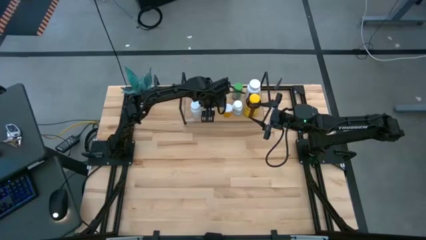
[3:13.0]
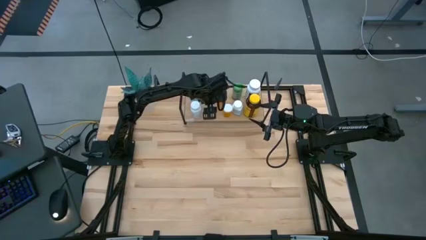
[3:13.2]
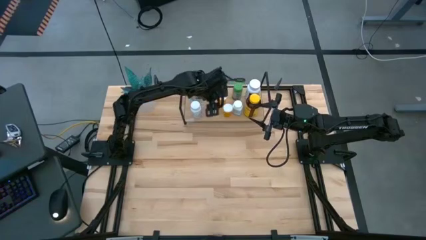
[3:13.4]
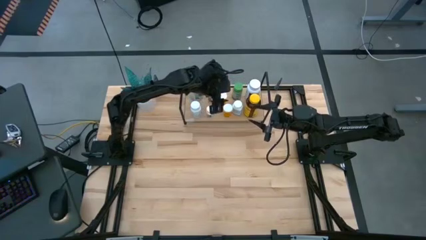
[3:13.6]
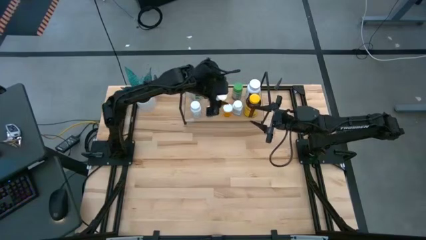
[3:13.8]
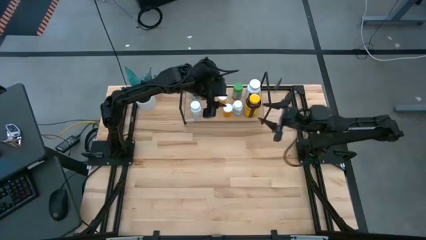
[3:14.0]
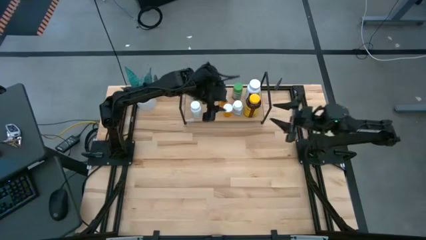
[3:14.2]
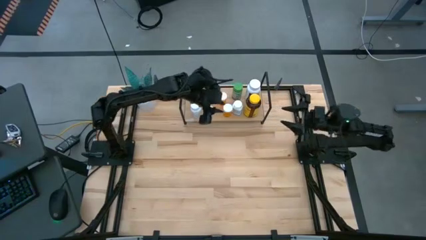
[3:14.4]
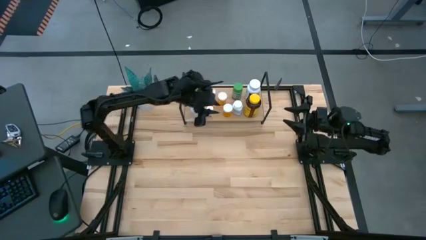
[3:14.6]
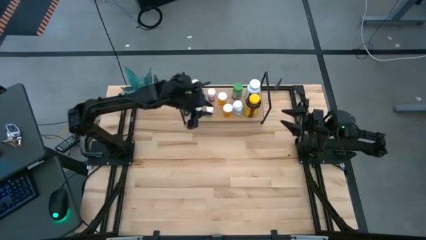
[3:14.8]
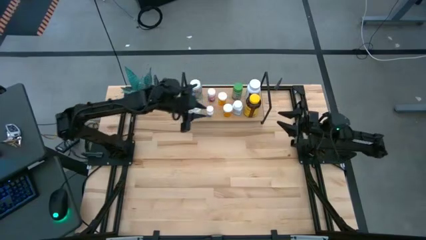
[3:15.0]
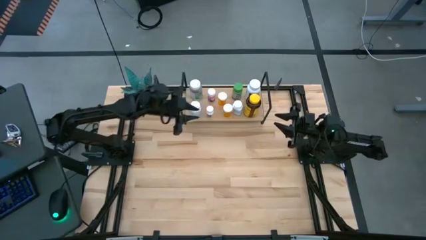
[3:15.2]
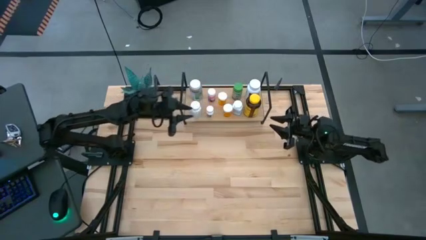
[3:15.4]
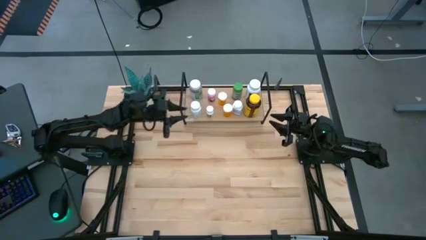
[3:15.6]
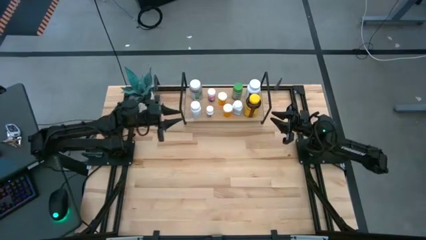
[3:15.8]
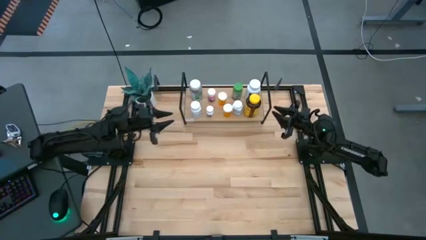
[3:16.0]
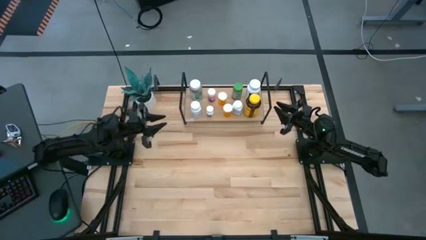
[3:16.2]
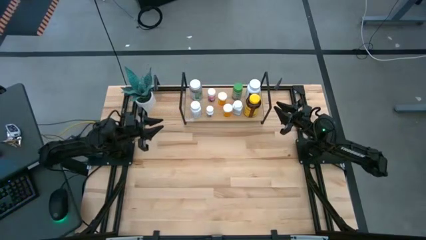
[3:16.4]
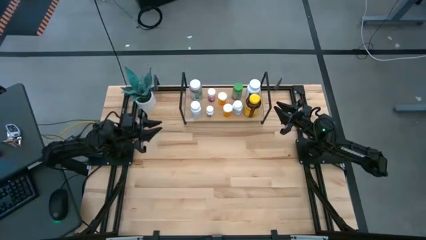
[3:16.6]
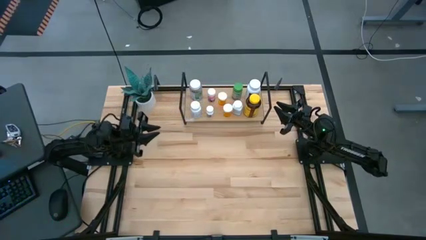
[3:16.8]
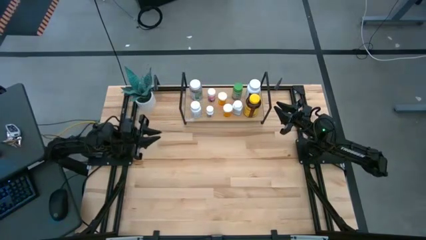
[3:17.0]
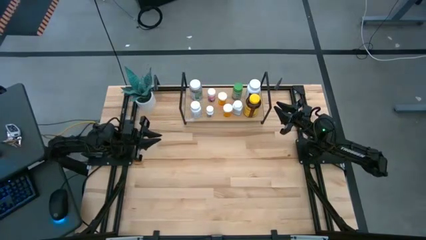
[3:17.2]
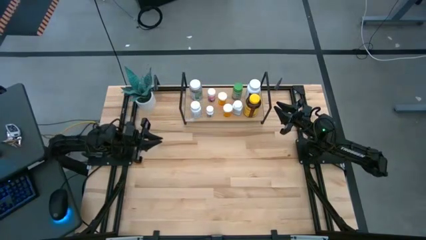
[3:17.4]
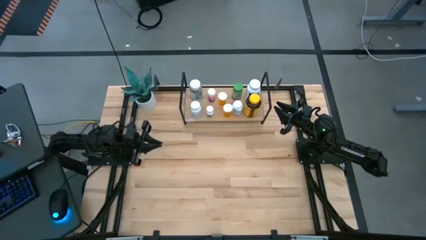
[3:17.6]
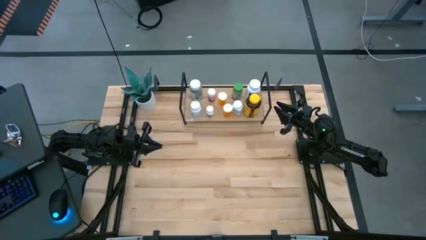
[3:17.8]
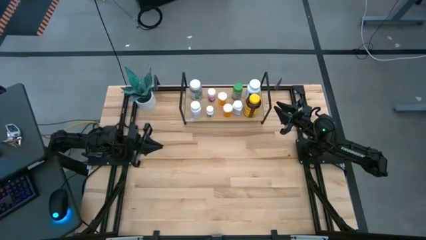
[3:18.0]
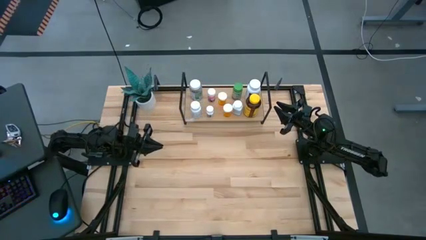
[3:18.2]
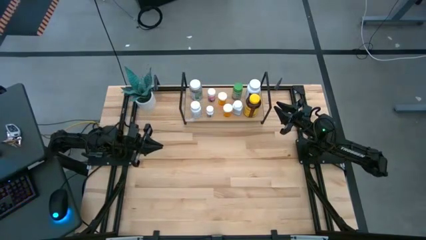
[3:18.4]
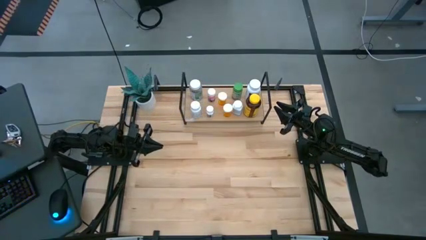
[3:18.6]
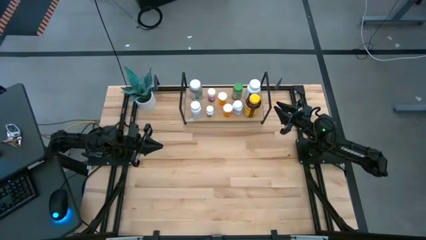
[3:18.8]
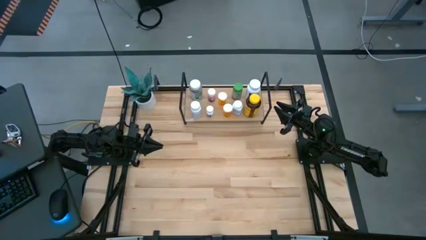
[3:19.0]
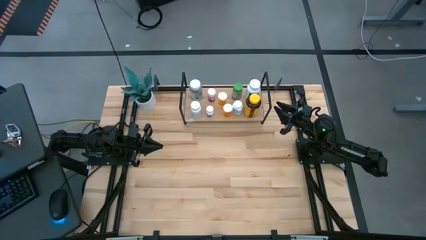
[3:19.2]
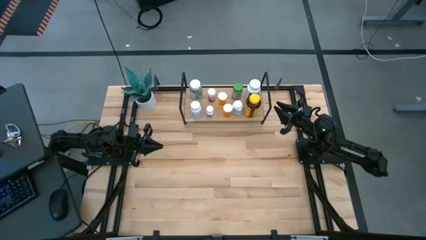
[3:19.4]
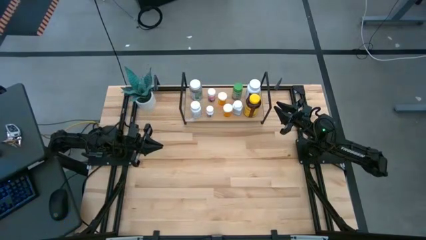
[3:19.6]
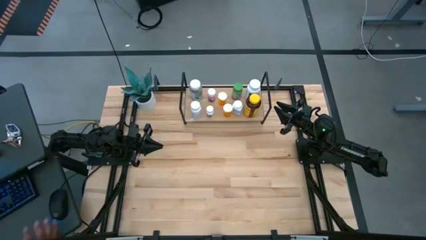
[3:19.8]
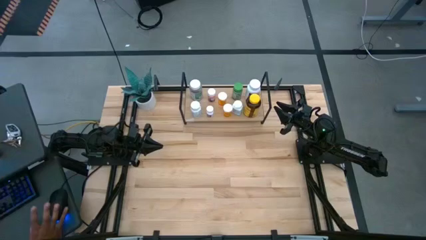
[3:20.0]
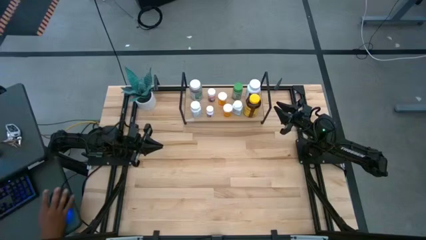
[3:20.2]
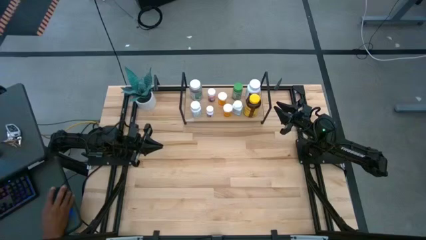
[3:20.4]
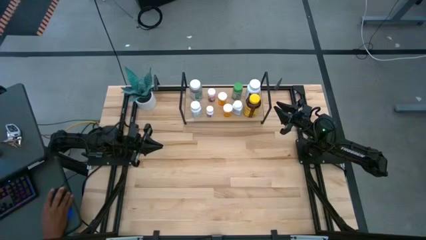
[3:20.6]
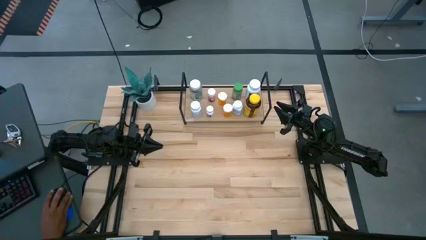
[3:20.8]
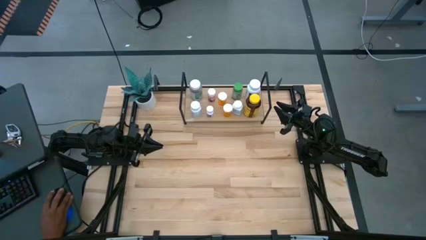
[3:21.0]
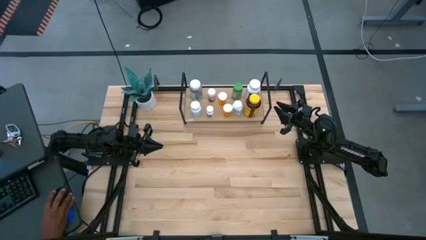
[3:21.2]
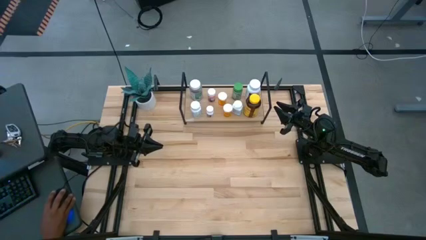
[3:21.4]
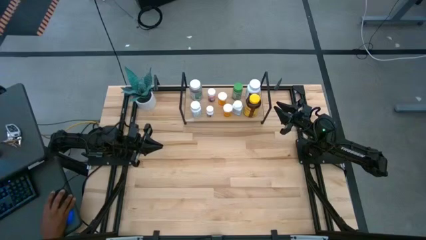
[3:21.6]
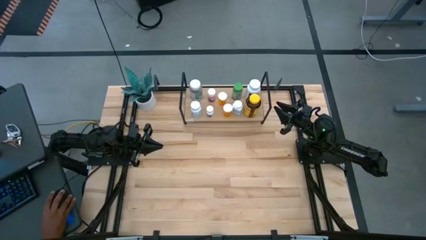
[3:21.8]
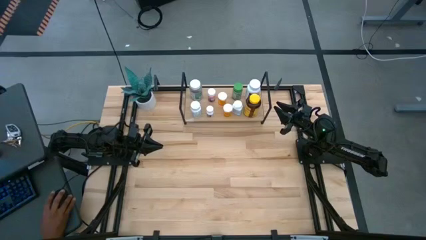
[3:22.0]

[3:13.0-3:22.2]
Task: Pick and place medicine bottles onto shelf by color
Return to Home Position

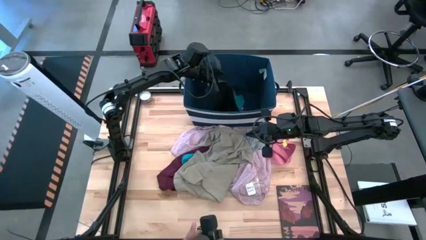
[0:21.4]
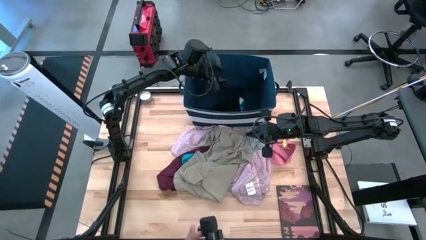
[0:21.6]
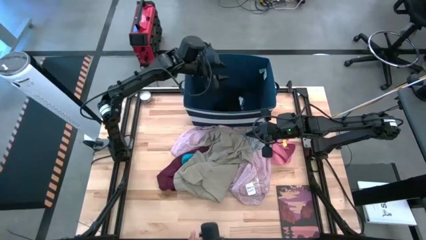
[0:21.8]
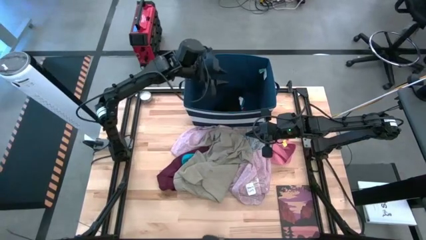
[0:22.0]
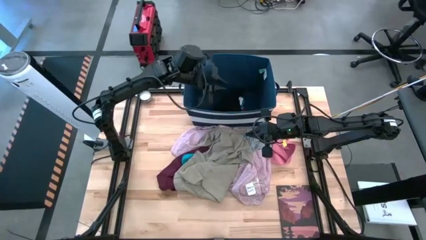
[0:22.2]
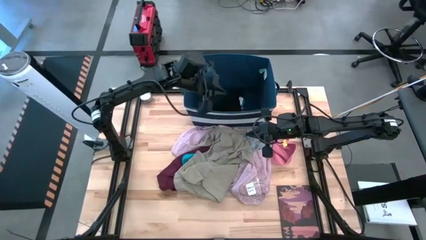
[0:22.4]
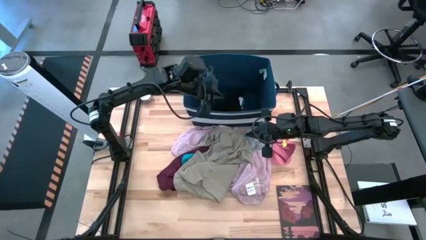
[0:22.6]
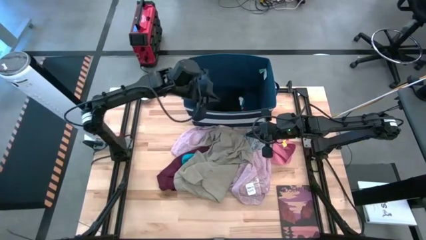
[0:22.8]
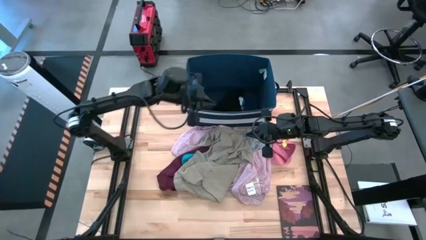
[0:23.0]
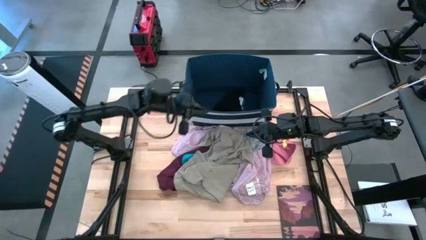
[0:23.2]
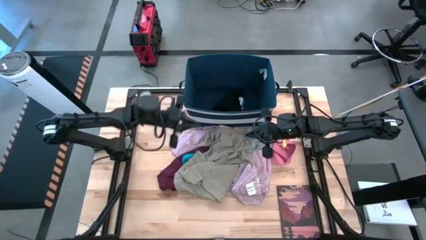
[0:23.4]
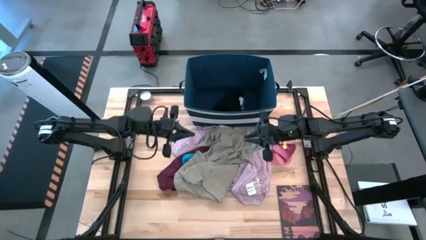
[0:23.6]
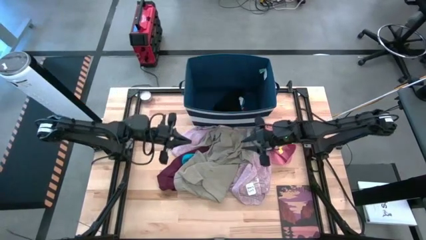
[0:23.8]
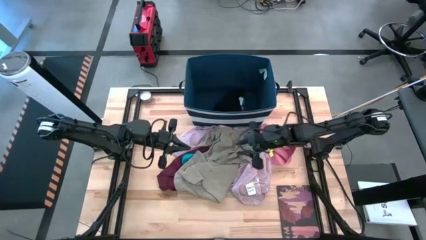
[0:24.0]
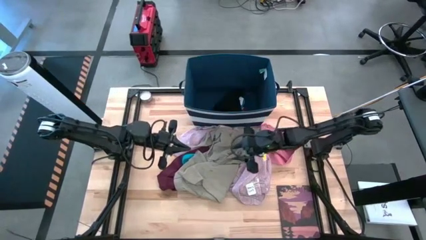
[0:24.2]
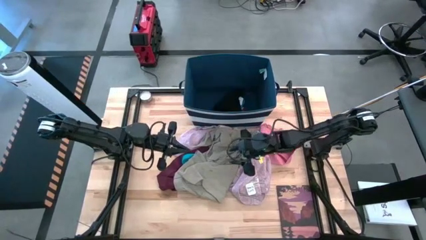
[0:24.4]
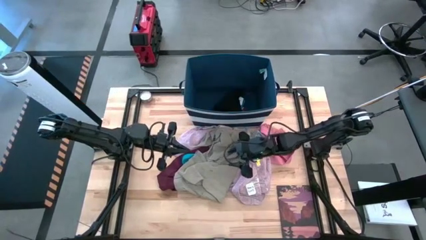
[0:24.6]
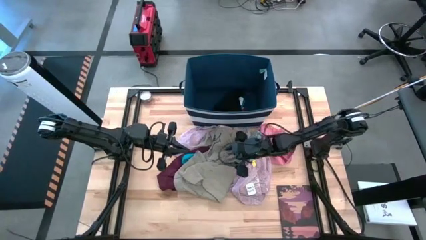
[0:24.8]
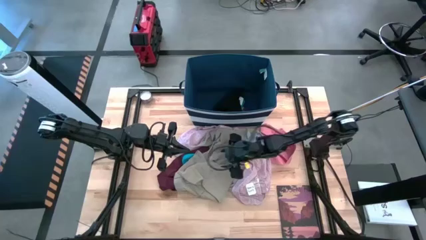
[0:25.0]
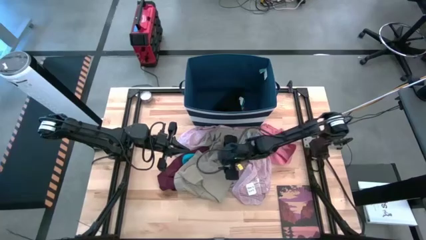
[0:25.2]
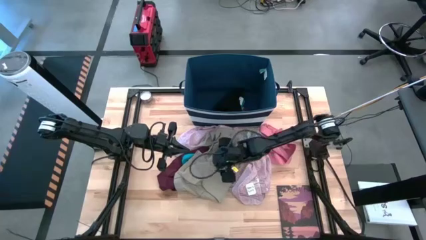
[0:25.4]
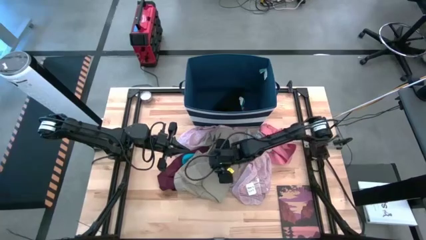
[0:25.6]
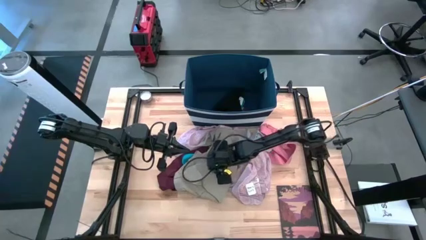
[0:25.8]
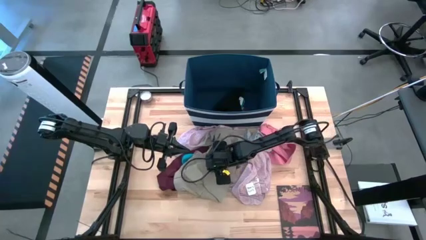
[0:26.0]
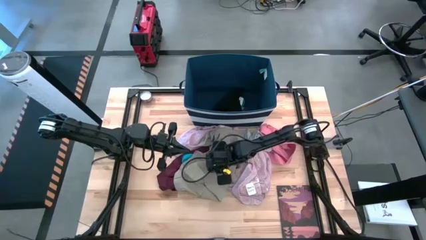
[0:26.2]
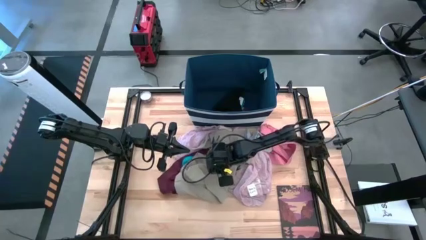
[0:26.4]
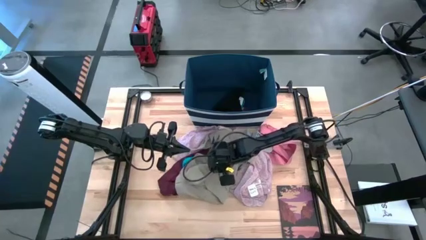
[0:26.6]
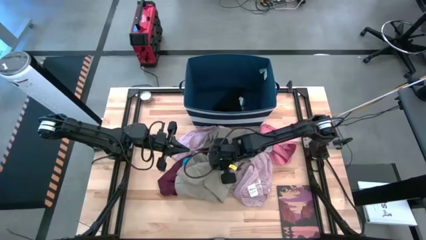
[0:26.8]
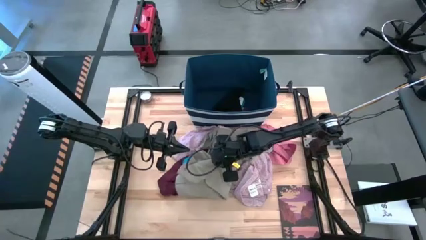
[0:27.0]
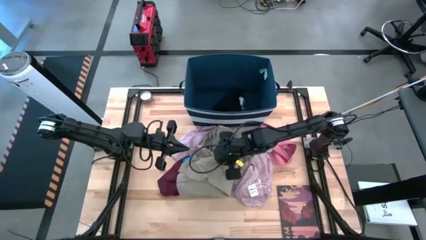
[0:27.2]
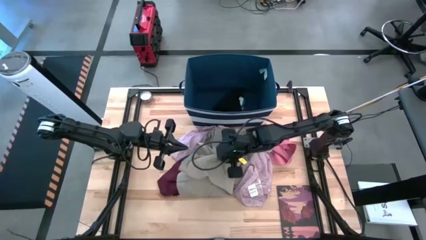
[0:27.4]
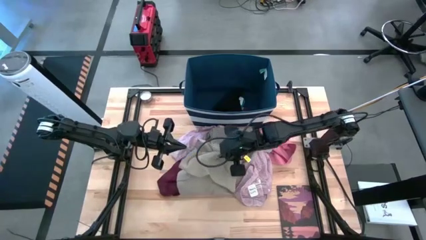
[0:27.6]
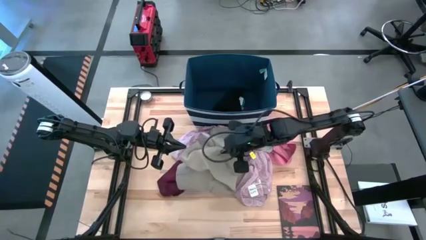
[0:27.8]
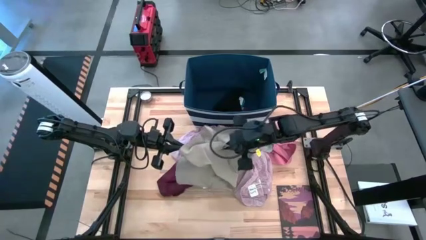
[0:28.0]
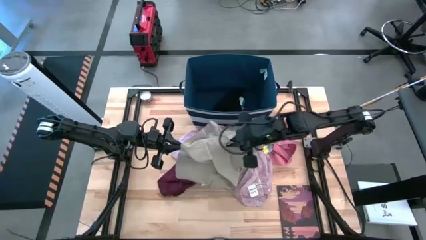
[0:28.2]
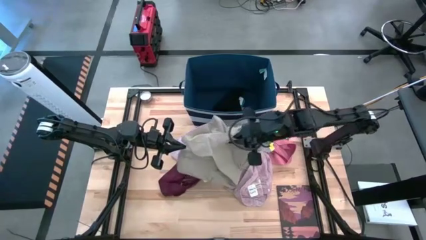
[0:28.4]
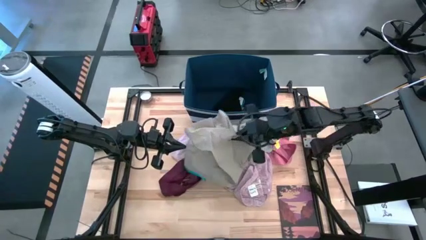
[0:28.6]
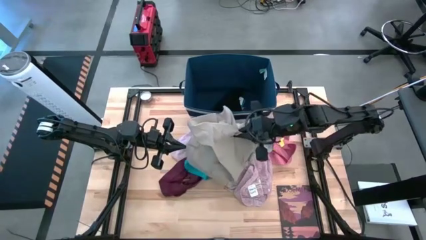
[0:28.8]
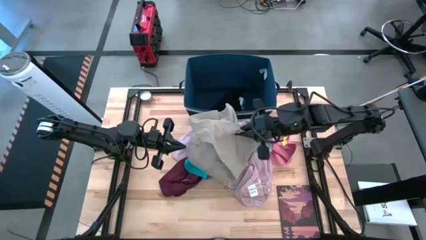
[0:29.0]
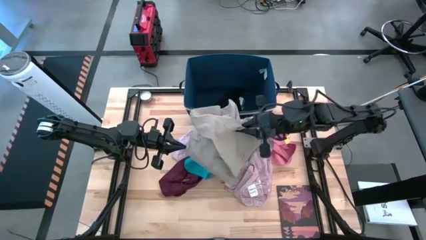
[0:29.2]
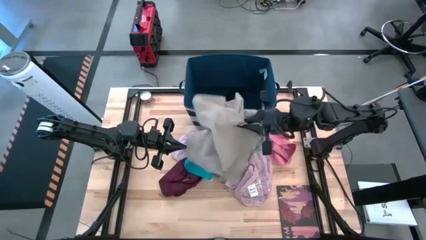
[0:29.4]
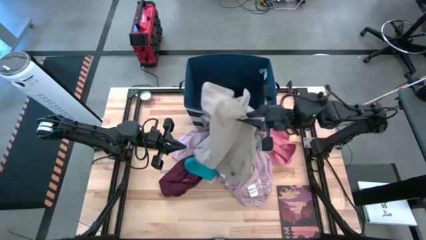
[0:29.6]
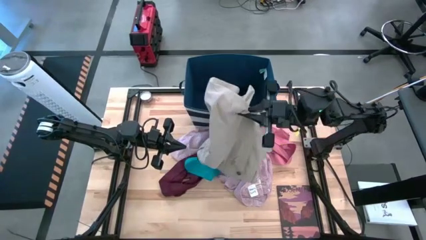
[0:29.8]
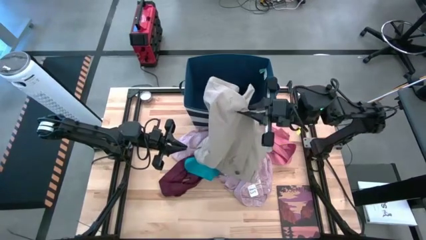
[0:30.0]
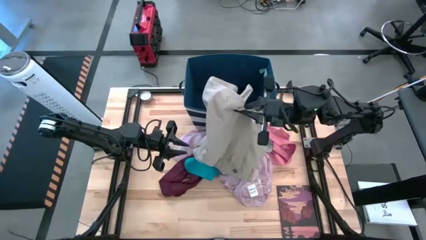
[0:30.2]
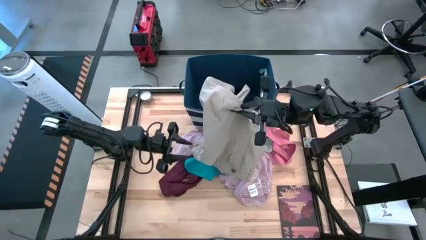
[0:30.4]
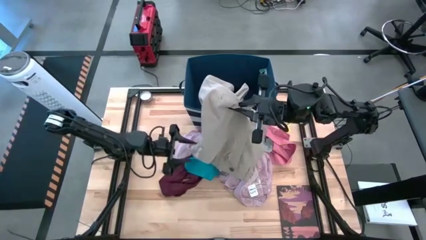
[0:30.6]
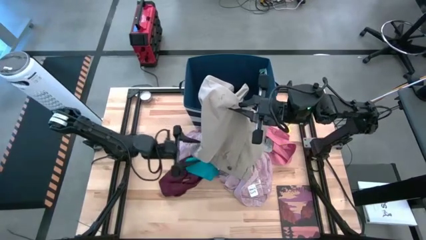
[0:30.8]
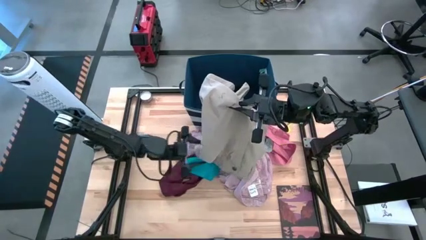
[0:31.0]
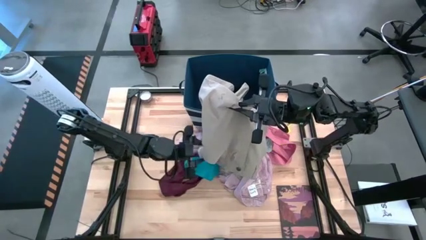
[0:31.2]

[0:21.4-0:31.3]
Task: Sort clothes
Put the brown shorts into the blue laundry organizer
